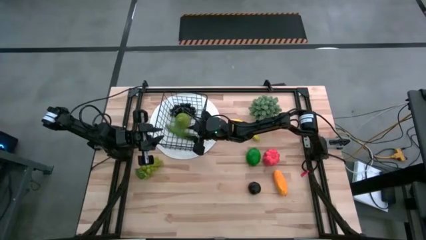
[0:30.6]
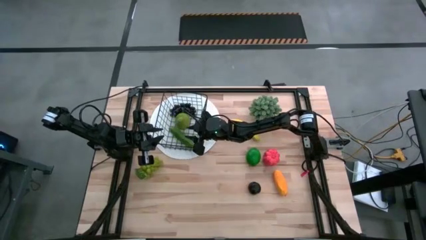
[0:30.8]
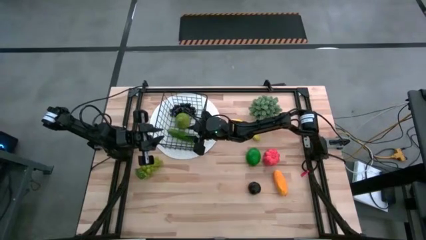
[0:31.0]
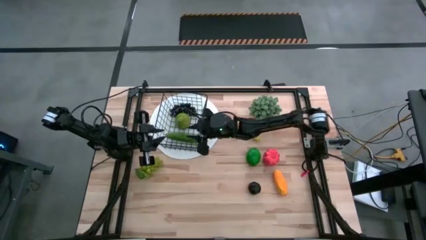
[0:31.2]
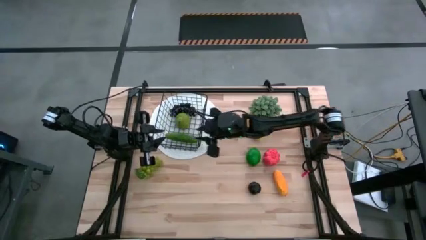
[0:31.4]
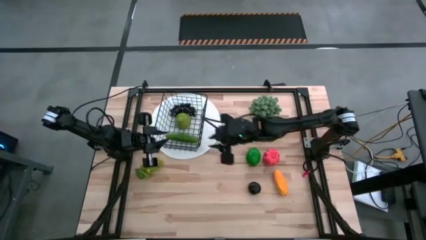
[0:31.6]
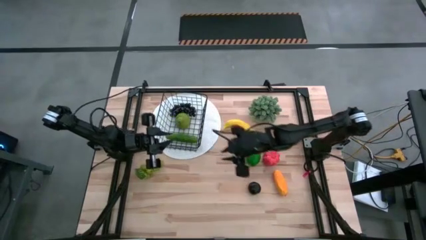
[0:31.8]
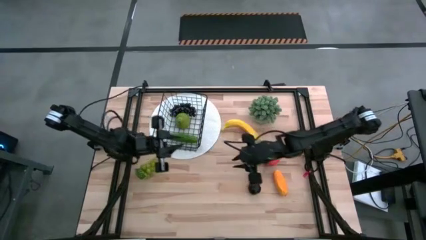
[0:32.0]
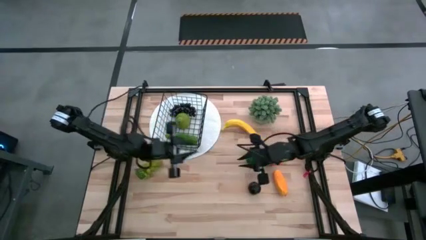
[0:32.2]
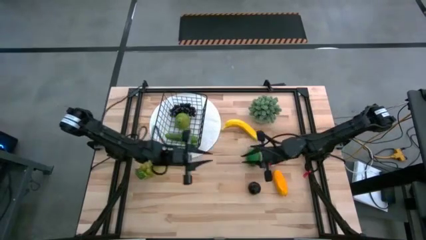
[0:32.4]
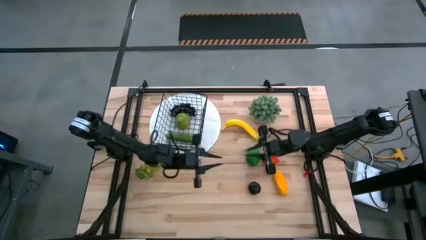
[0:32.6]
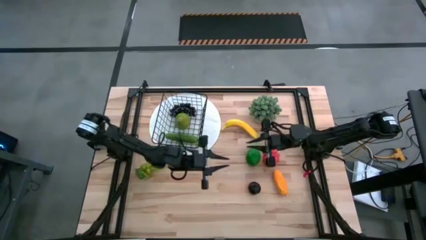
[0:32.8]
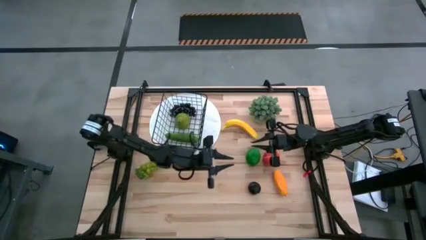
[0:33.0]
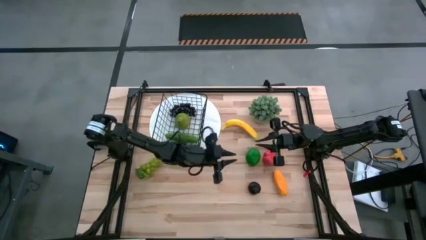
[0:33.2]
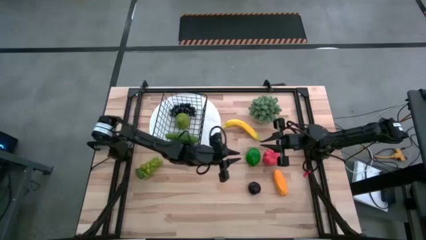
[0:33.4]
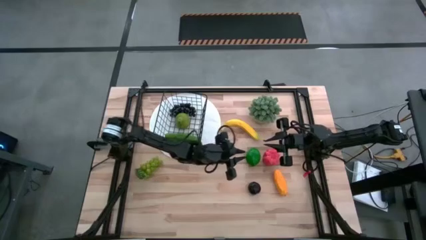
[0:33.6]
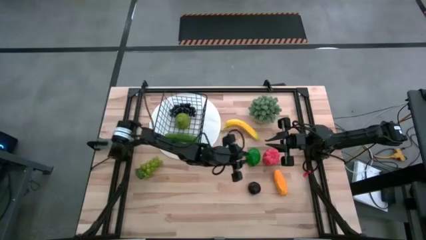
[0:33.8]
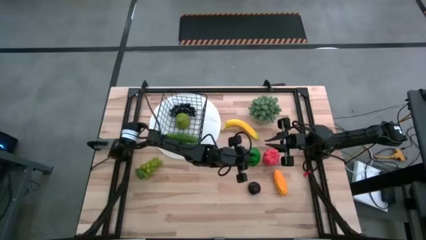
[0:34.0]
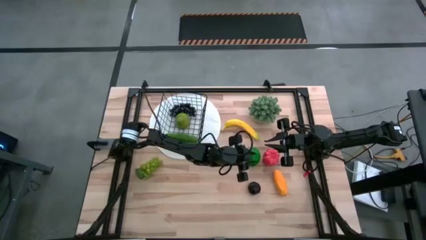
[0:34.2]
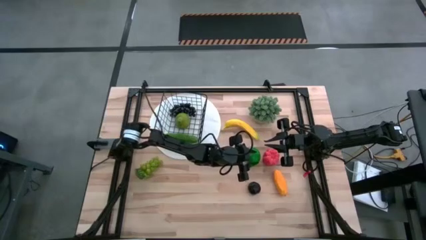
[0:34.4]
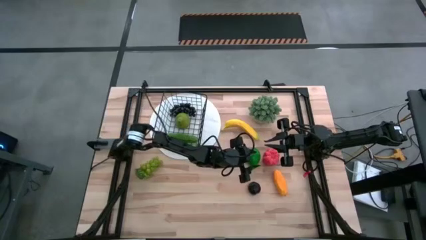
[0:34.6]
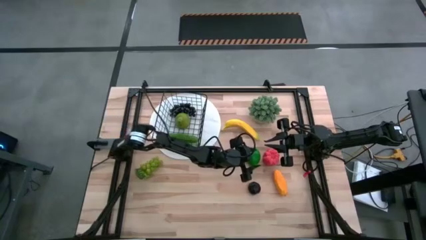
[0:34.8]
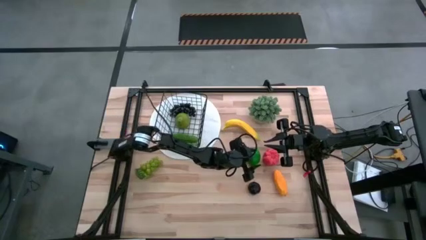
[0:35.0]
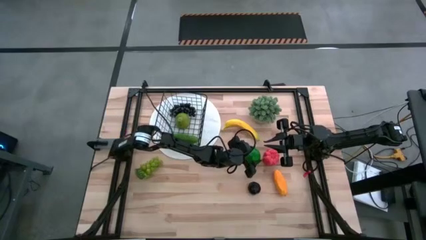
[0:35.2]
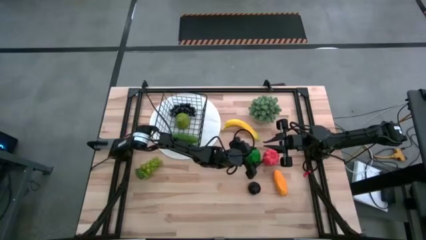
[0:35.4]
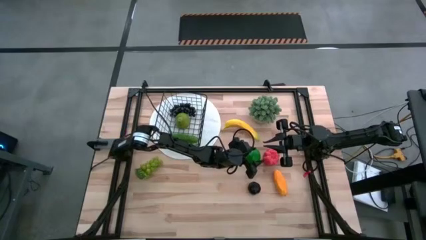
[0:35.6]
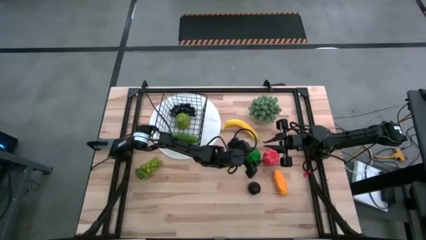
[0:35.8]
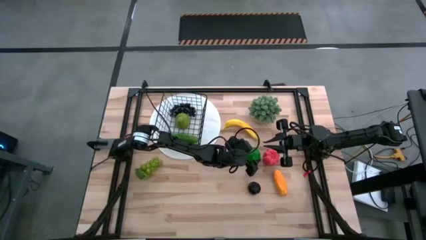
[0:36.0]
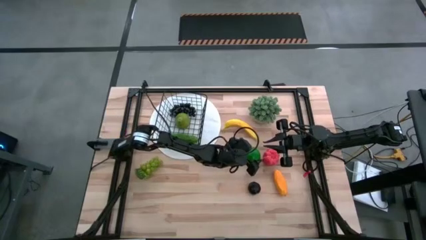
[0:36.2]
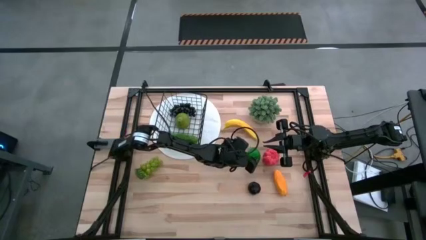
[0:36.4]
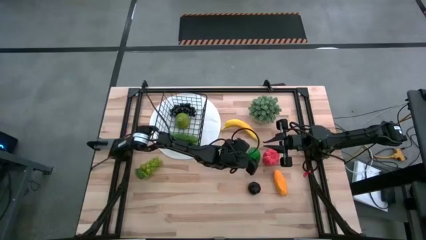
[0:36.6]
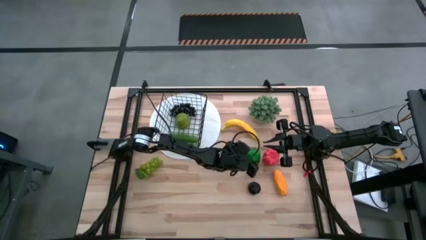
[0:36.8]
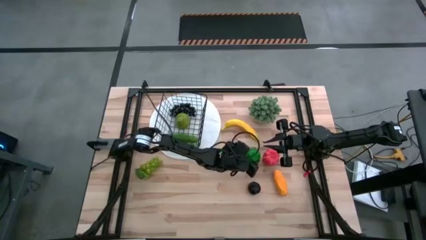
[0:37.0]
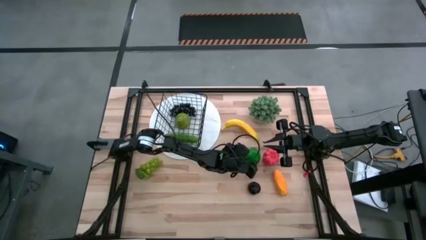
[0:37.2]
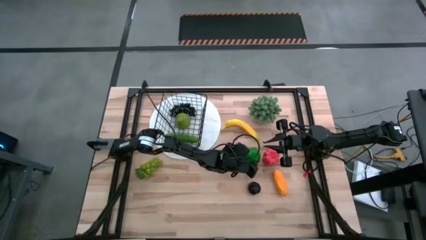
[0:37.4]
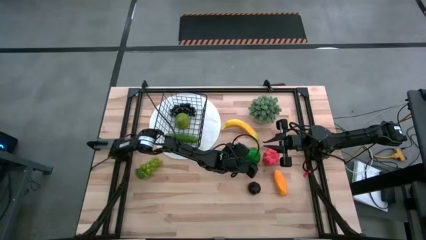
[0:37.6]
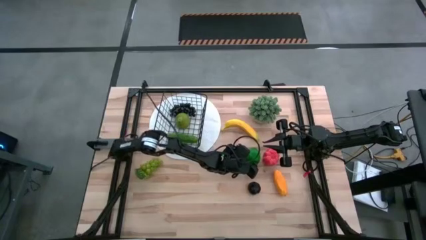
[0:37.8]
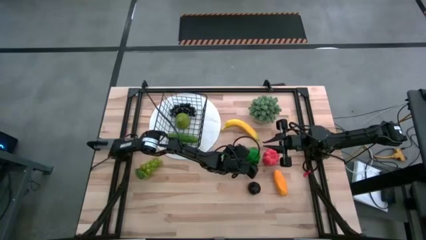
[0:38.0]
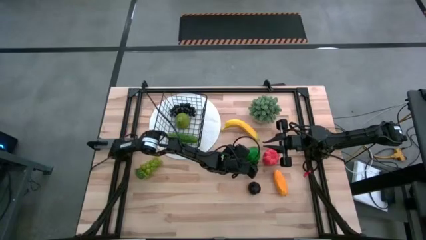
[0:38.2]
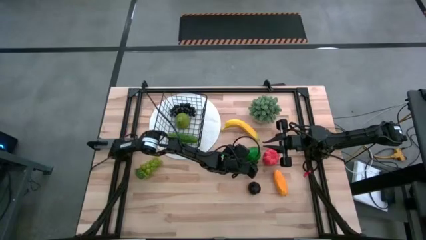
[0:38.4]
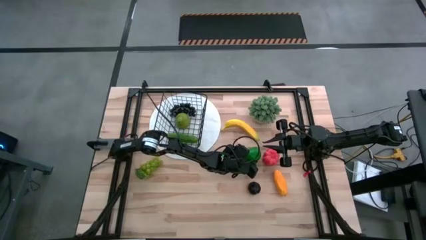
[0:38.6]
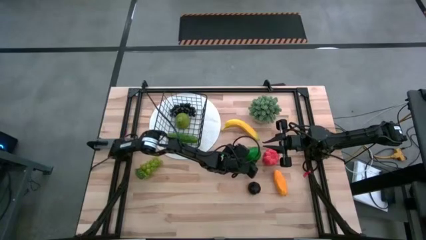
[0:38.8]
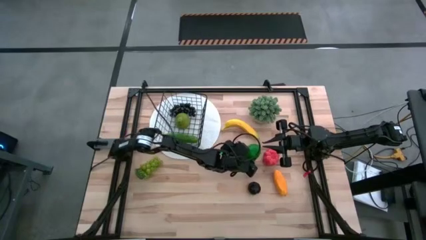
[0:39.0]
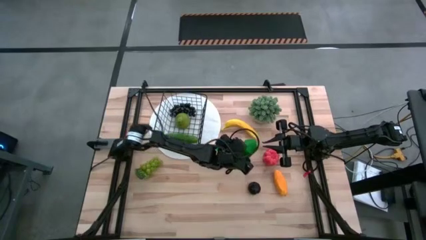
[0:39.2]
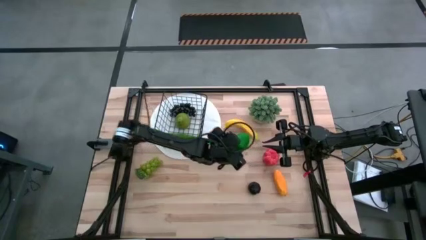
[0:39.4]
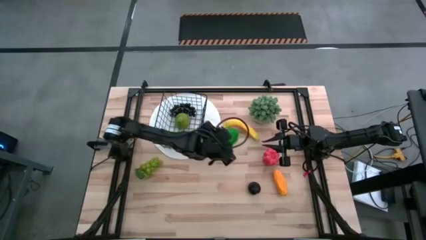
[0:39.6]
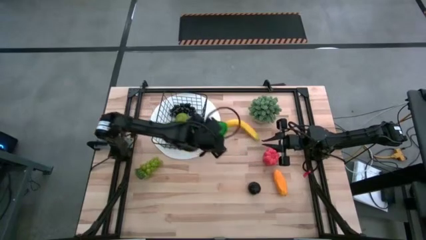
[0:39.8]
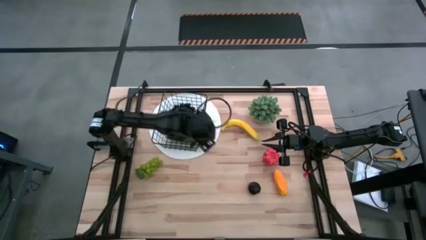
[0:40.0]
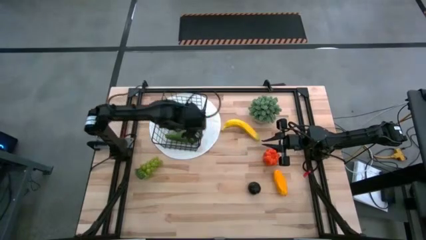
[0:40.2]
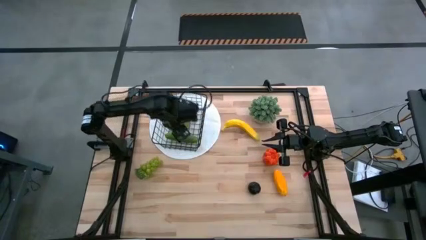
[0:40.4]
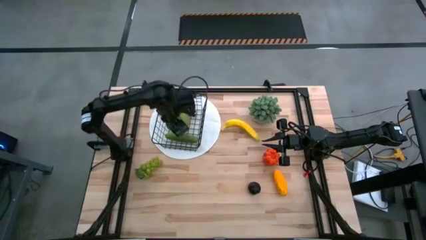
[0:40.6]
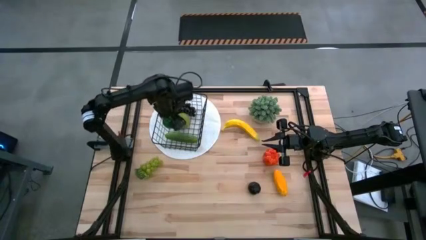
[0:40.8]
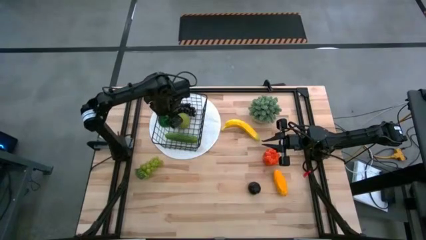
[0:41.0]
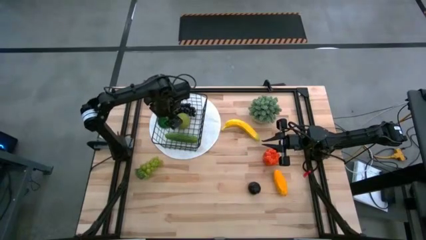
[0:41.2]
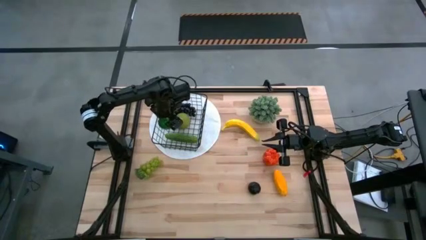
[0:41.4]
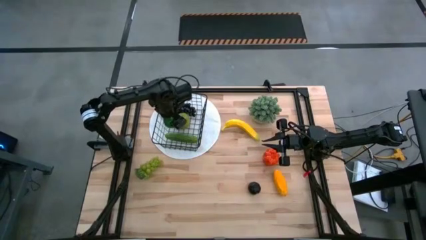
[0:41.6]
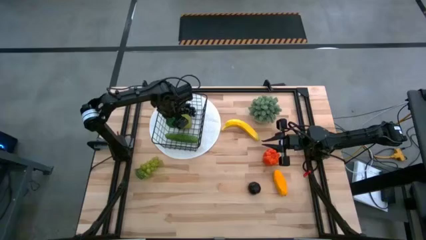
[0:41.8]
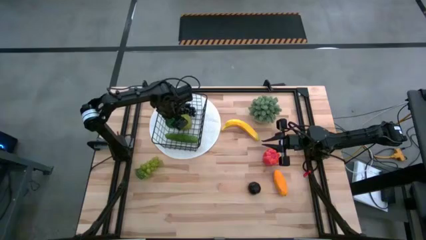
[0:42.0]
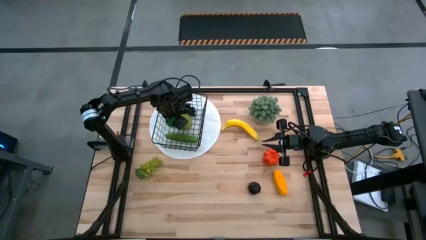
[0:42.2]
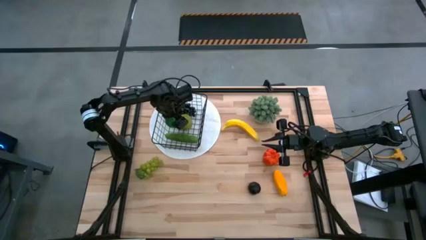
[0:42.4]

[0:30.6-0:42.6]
Task: Build produce basket
Put the green lime into the wire basket
